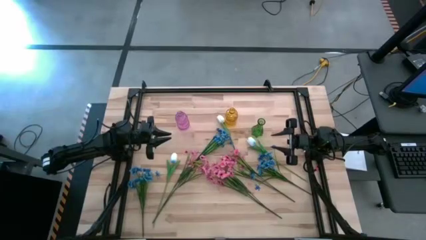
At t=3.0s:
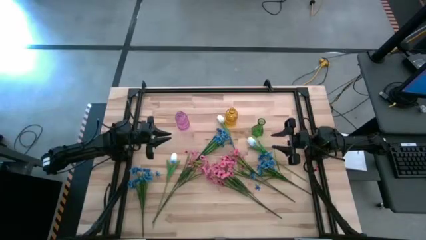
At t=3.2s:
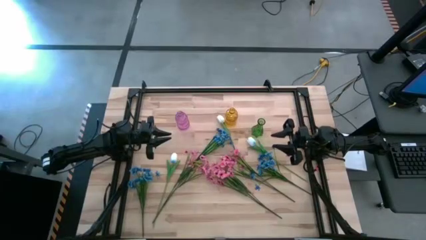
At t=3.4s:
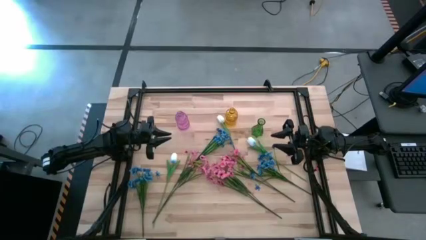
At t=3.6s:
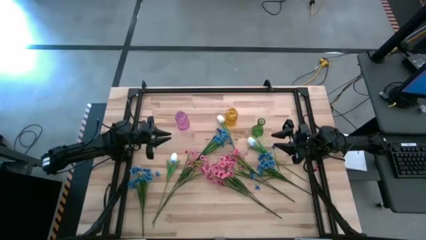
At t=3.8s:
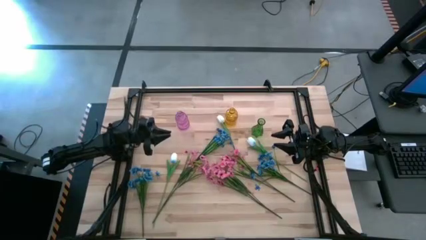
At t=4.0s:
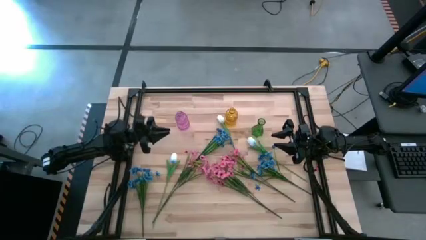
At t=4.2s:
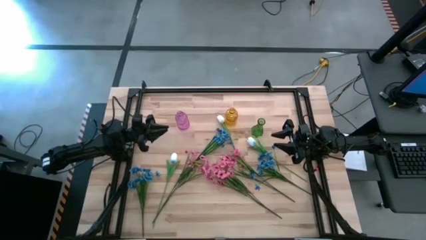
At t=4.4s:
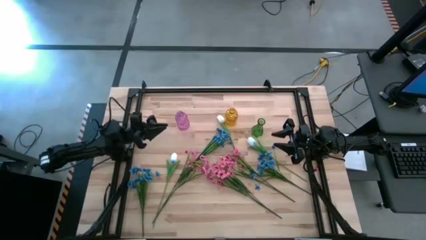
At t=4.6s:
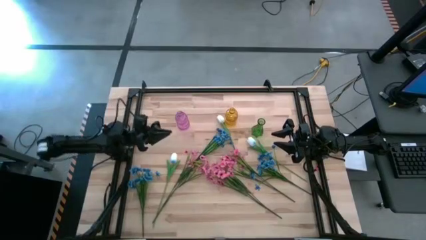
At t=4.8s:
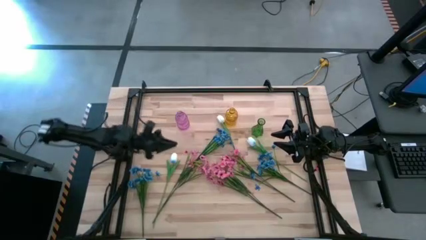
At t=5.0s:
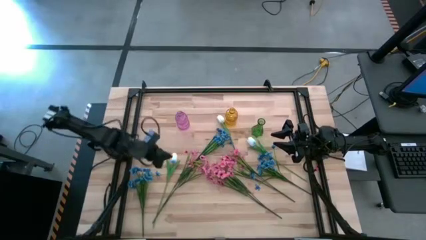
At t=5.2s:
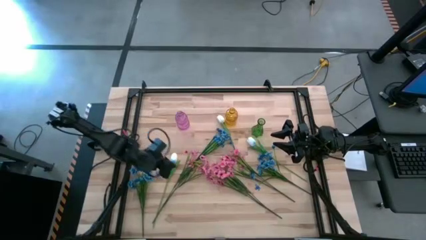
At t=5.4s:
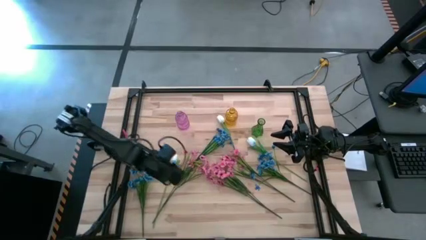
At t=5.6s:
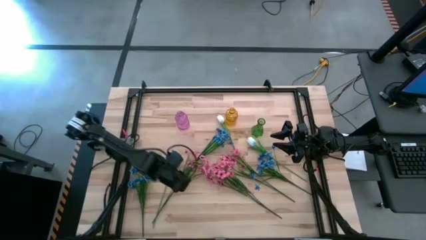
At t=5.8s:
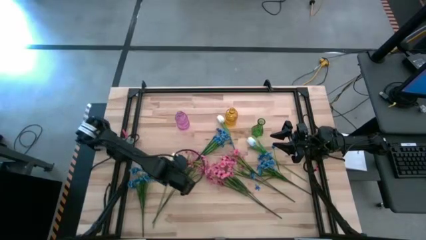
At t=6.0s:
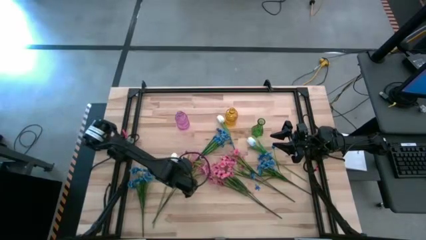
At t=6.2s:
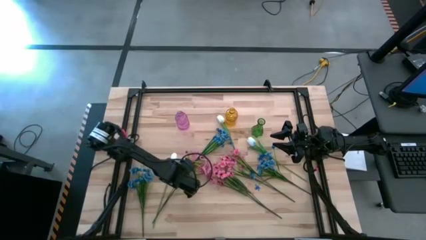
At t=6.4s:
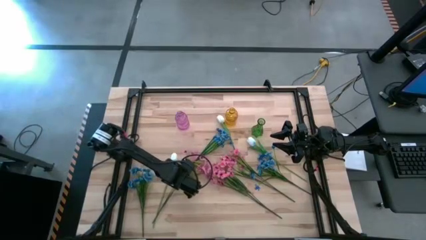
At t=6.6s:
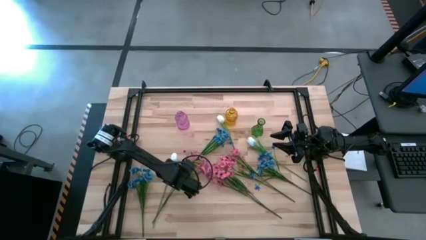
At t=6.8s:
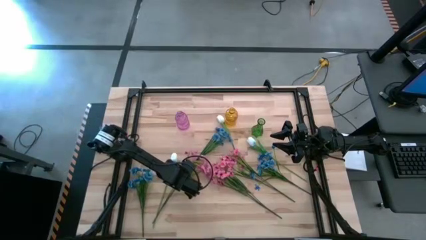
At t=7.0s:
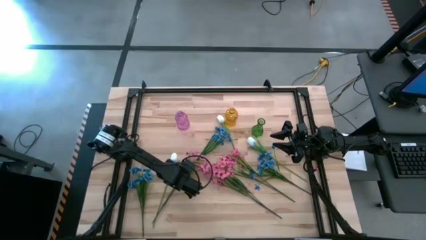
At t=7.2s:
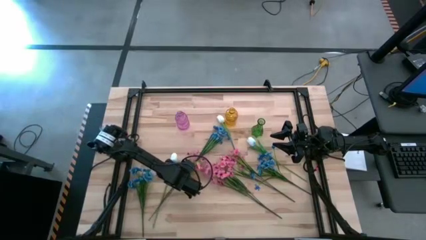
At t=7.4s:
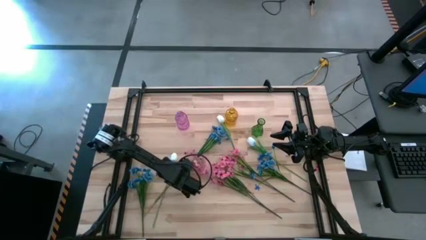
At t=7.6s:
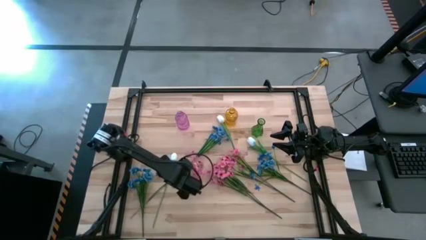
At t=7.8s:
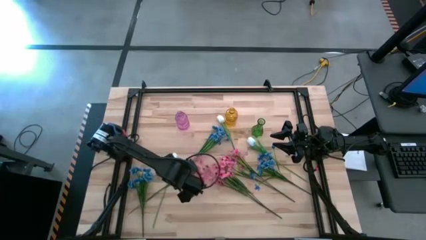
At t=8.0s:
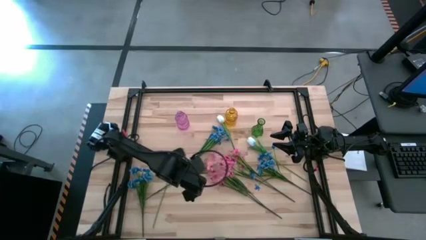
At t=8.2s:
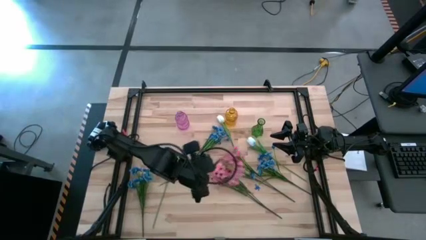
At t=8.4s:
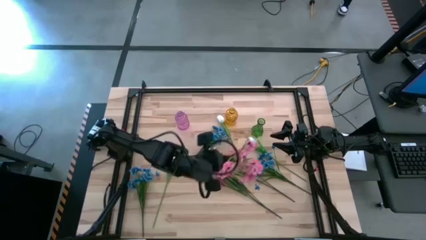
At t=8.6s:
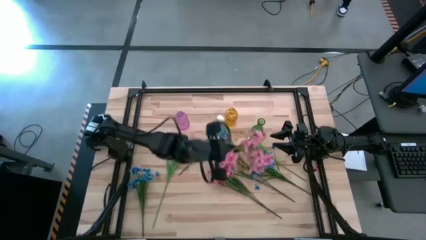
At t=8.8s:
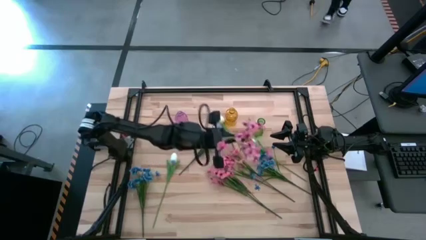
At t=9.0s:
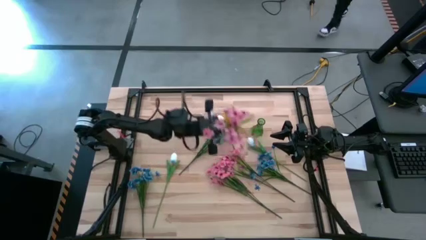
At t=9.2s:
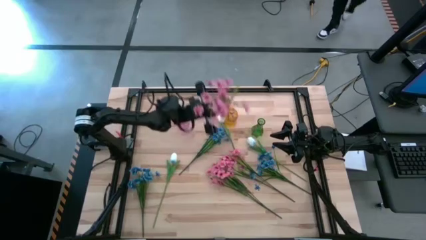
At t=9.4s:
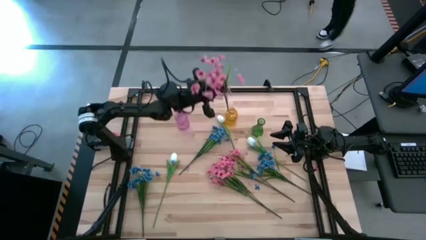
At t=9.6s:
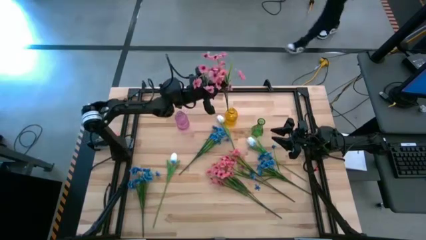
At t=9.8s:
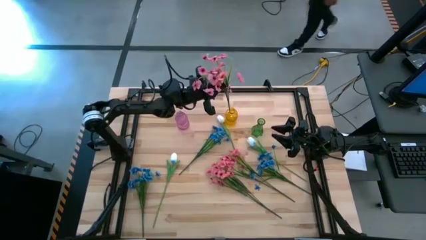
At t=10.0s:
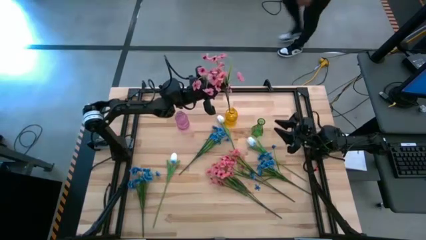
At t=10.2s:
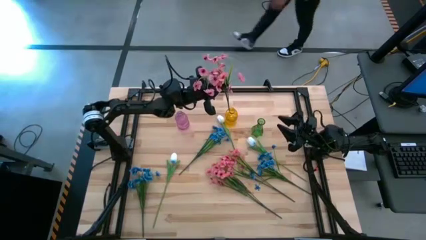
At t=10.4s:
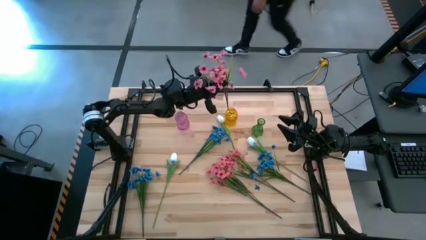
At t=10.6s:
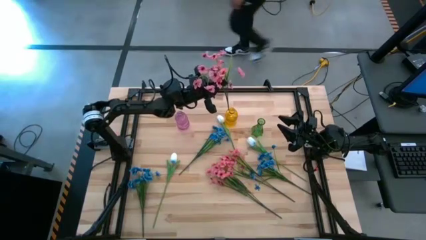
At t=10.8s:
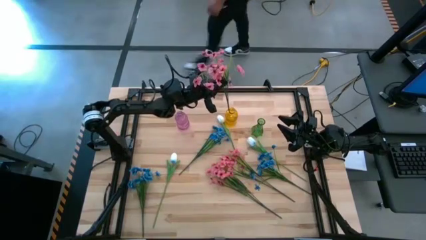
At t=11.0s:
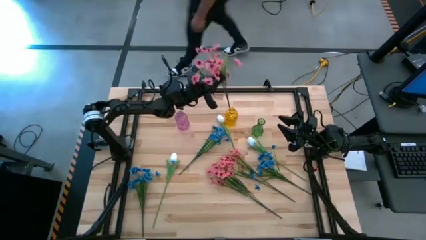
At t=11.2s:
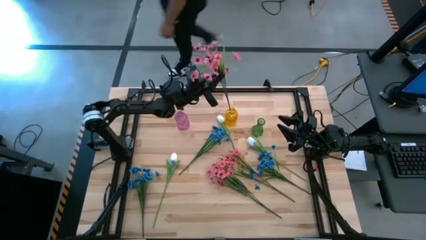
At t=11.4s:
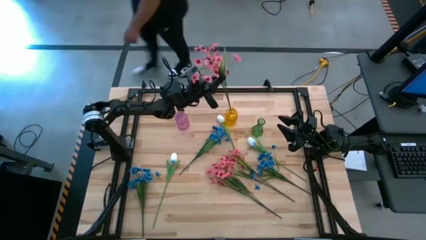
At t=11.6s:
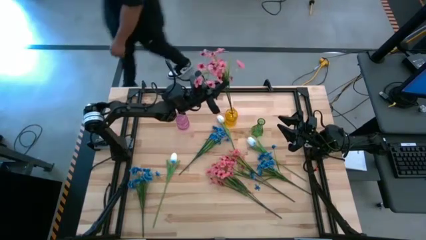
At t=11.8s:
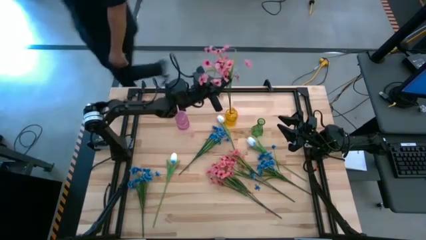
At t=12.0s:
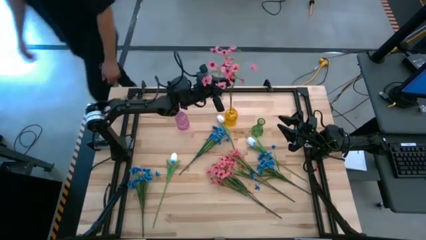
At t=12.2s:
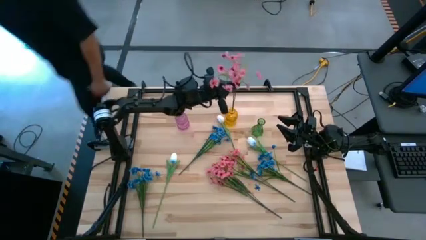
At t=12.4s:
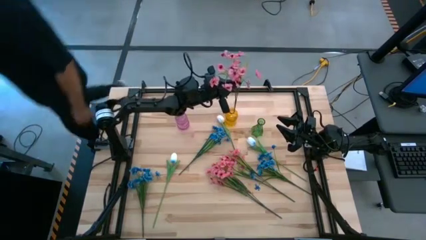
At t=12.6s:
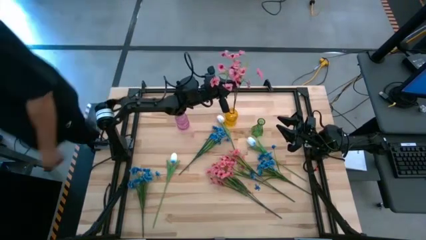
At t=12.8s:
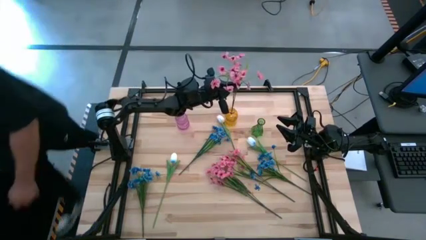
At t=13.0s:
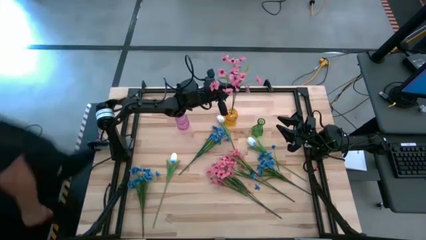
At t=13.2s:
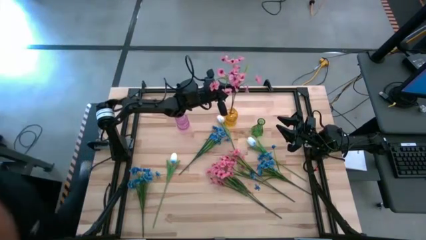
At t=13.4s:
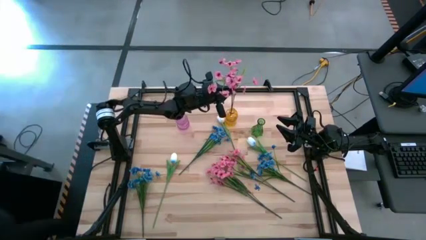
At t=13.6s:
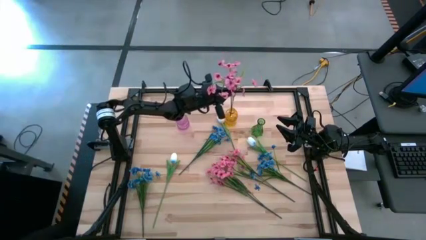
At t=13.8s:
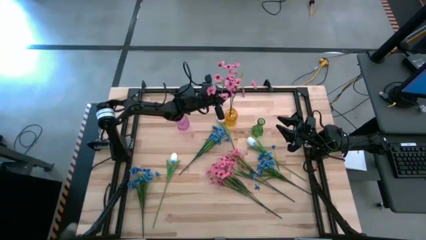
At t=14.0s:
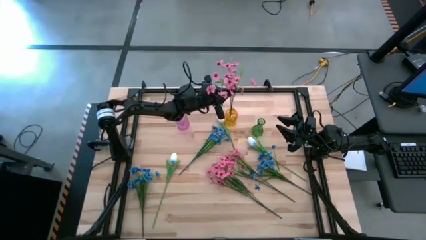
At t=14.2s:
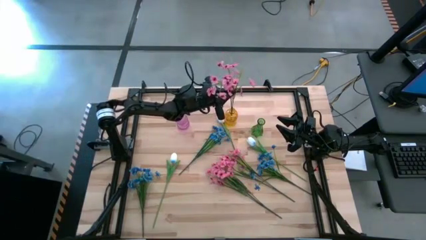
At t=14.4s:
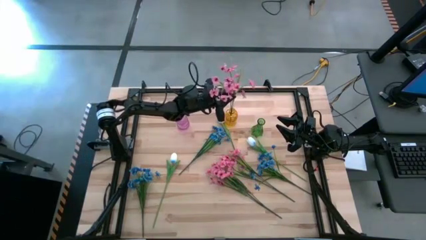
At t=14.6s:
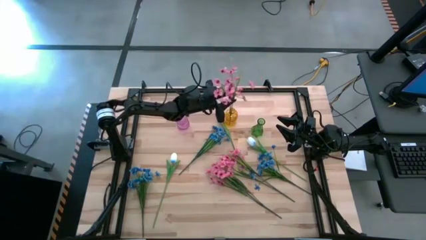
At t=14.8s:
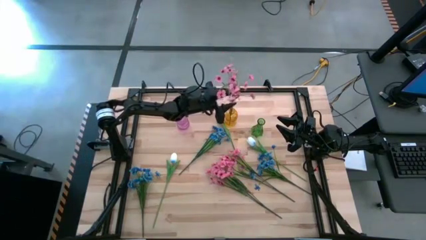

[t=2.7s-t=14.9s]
Task: Sort flowers into vase by color
Put the left pink flowers into the yellow vase
